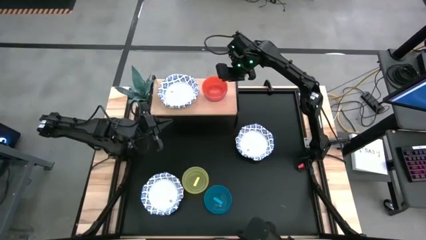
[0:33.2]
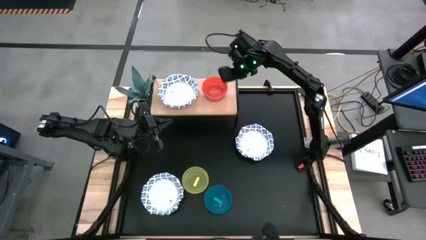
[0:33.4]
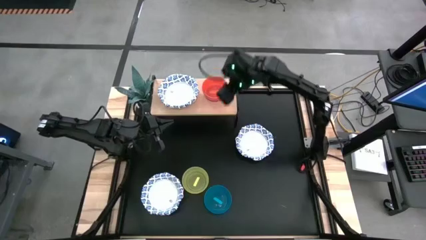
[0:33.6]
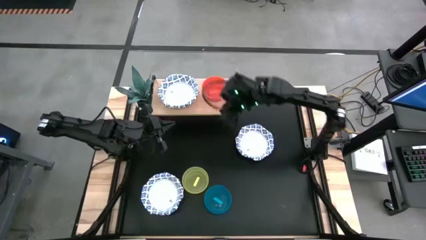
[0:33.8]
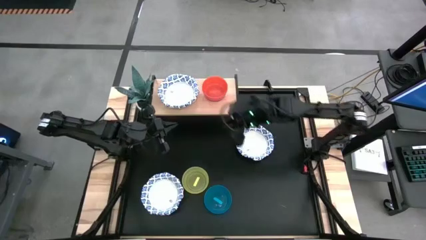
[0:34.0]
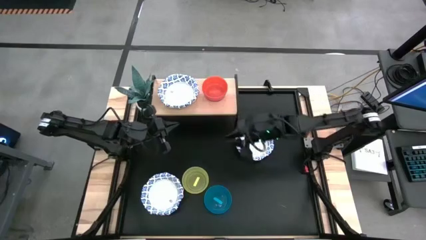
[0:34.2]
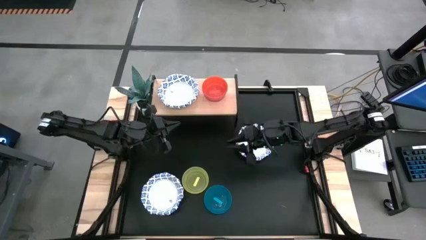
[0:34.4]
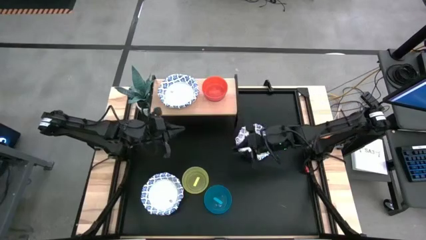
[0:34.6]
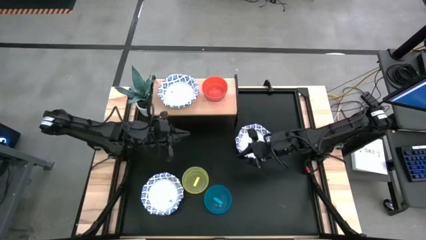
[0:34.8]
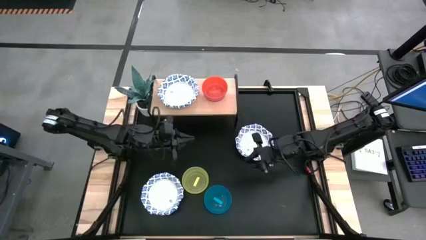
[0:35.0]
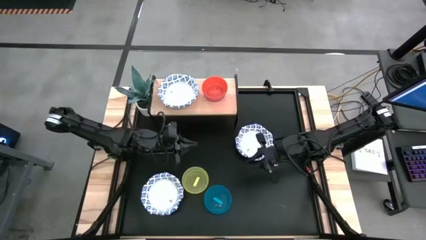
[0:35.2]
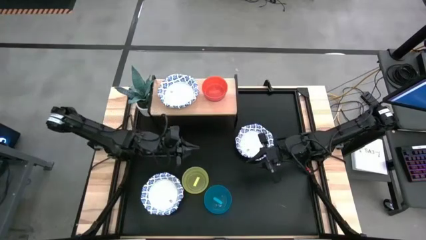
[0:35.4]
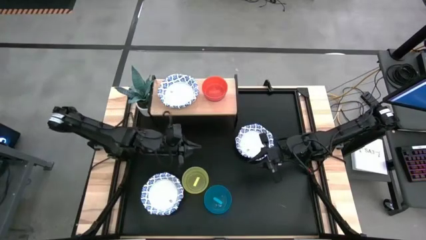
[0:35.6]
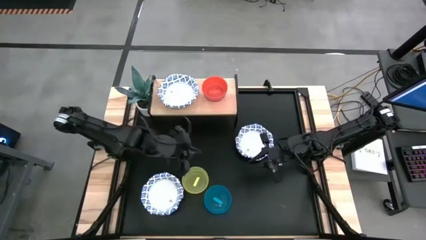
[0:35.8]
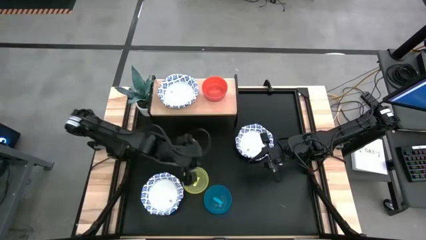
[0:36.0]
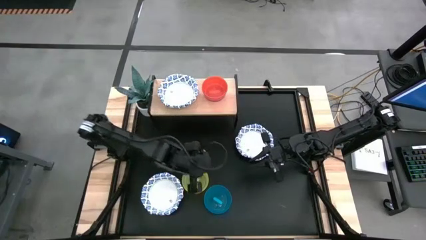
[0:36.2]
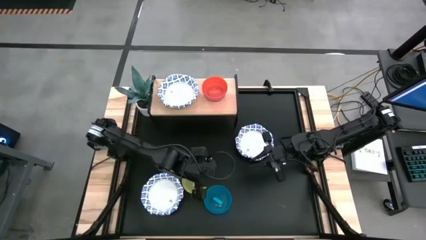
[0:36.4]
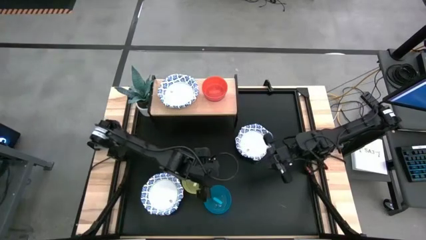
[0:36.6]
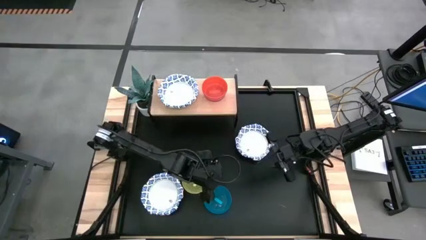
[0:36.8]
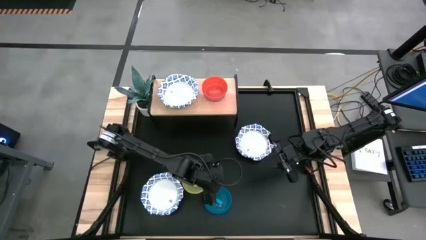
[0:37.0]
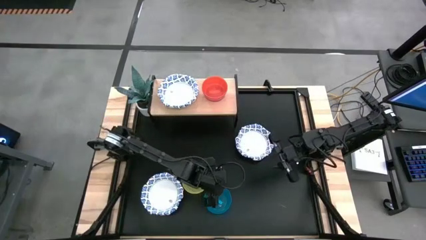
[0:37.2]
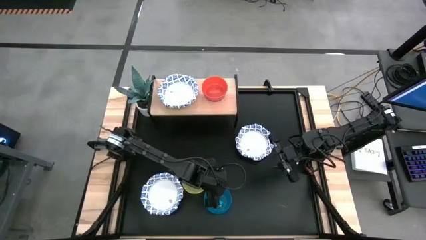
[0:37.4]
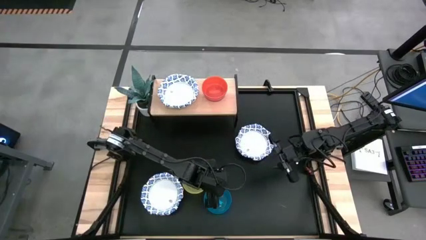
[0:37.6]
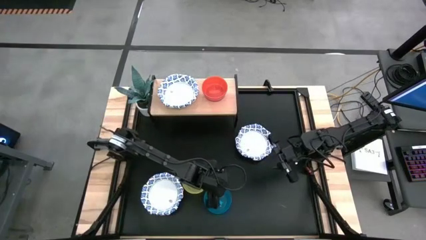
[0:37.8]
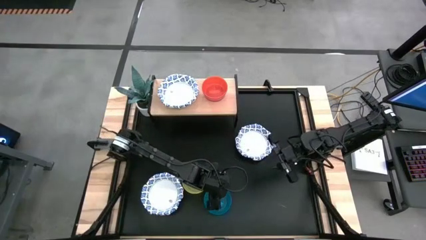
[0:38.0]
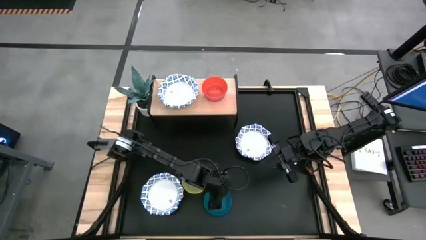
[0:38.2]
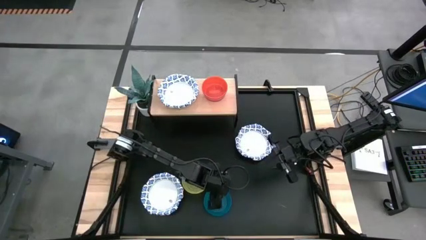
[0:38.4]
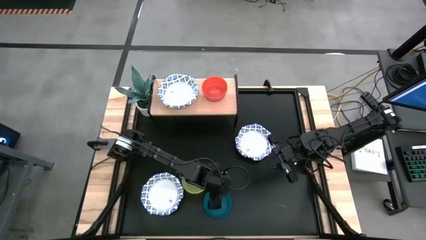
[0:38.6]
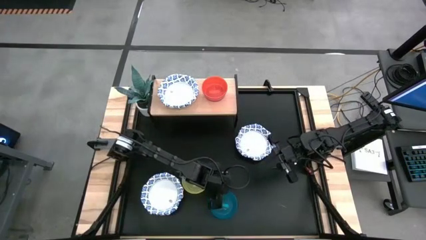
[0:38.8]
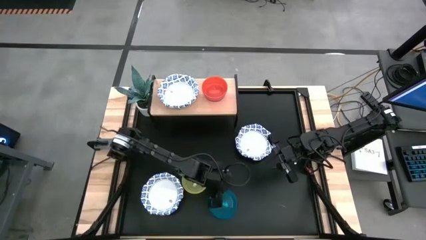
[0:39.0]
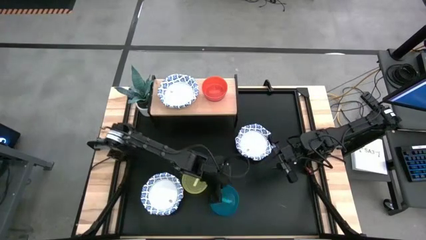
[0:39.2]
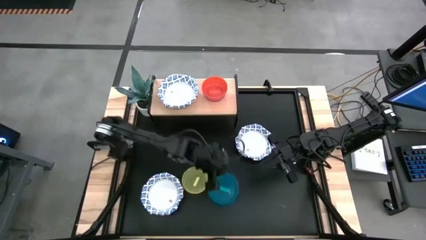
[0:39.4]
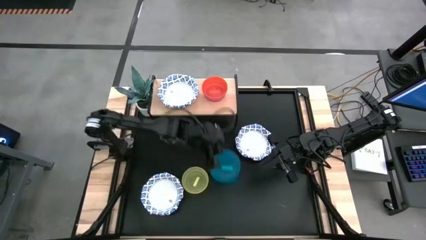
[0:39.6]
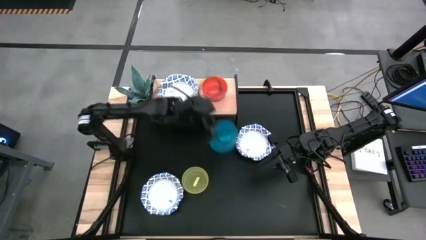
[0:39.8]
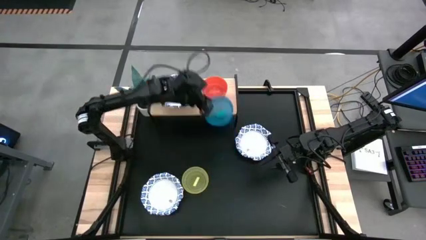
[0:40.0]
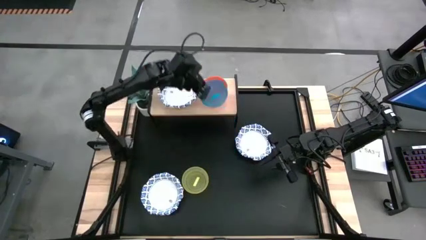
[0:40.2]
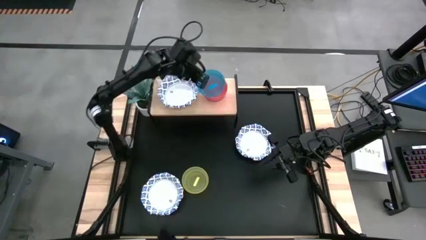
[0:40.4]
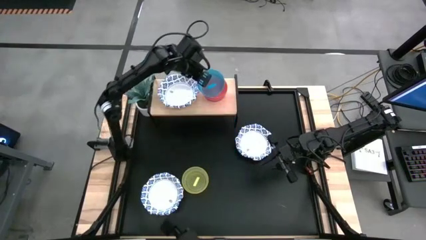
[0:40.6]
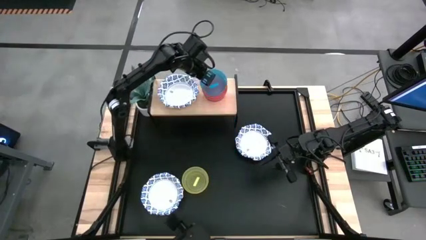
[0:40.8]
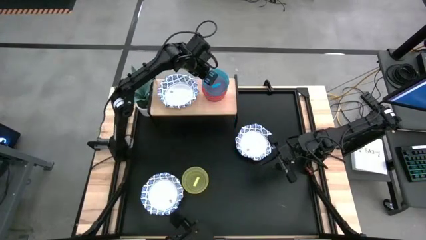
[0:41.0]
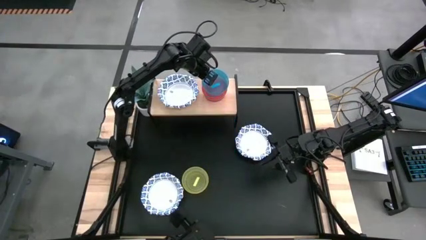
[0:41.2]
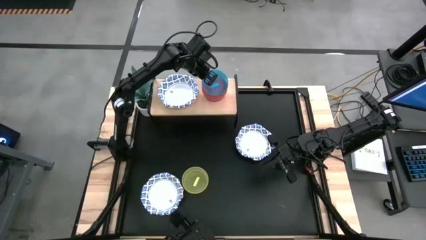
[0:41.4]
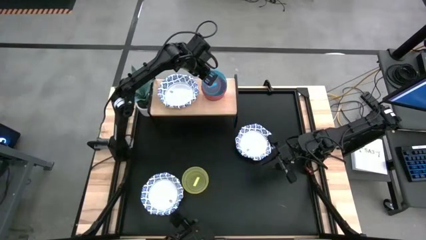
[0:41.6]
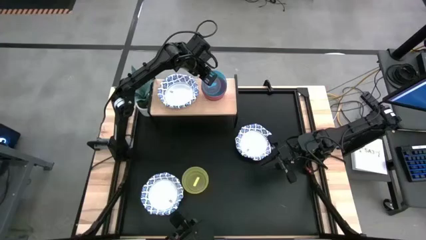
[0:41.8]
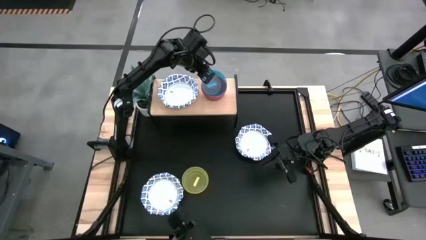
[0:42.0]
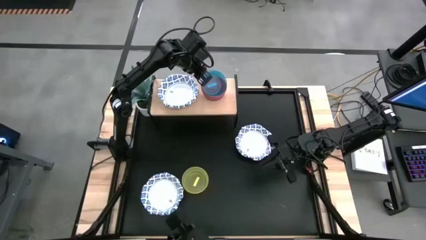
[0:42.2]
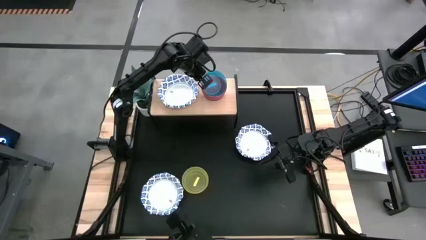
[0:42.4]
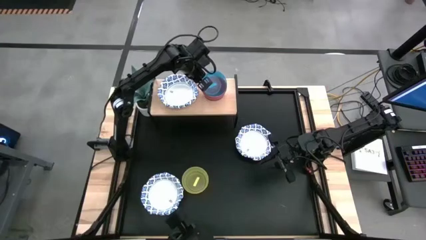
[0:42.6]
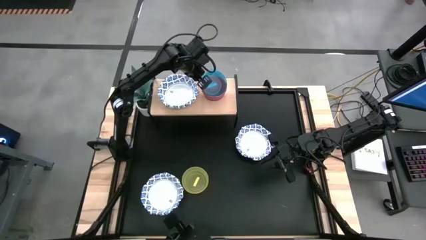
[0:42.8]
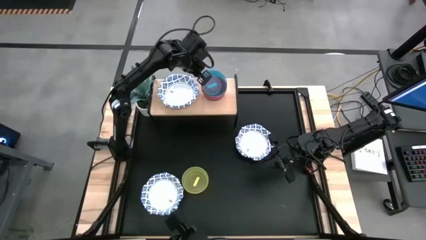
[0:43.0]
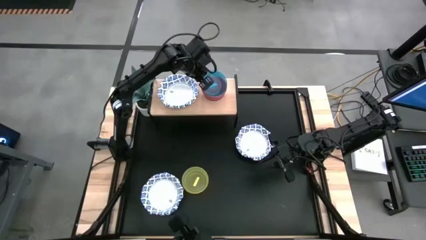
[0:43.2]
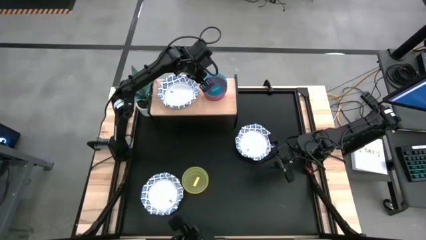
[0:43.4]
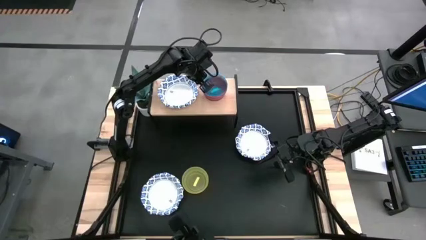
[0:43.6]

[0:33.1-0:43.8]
Task: Place and stack bowls onto a shelf
Stack the blue bowl on top of the orange bowl on the shelf

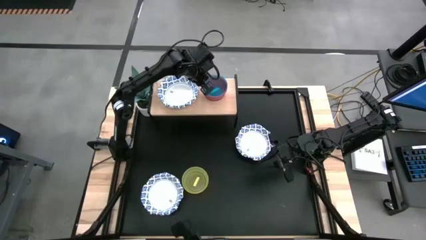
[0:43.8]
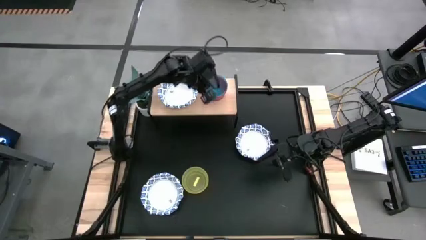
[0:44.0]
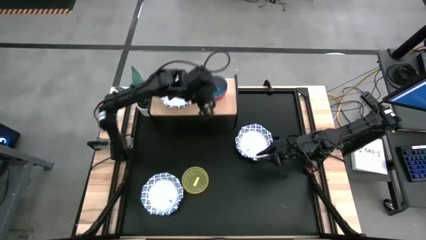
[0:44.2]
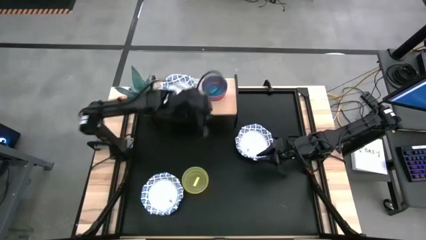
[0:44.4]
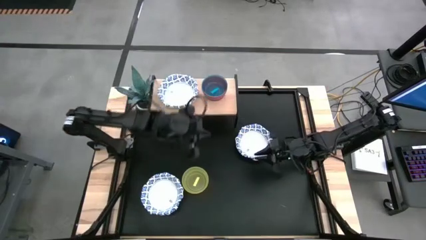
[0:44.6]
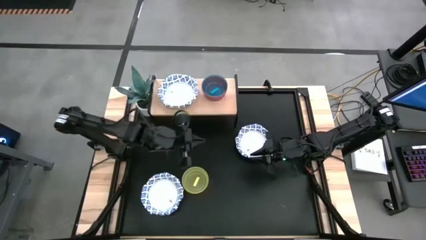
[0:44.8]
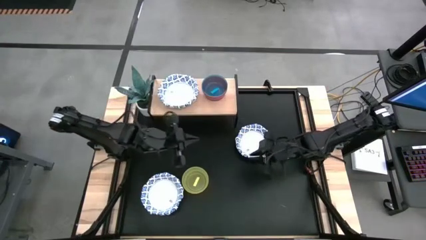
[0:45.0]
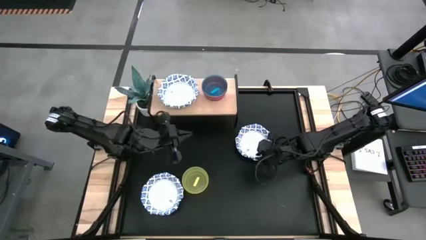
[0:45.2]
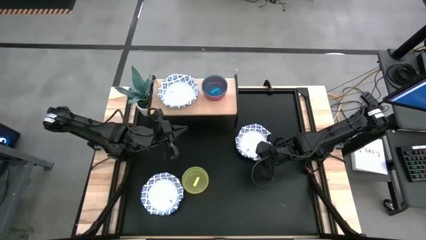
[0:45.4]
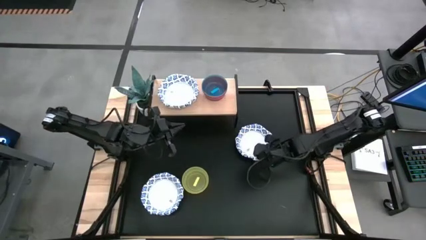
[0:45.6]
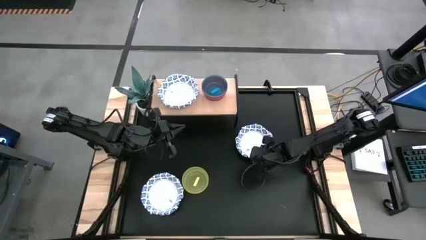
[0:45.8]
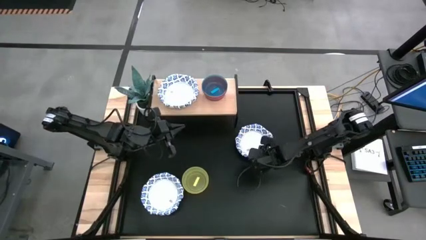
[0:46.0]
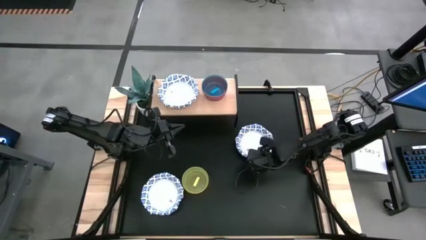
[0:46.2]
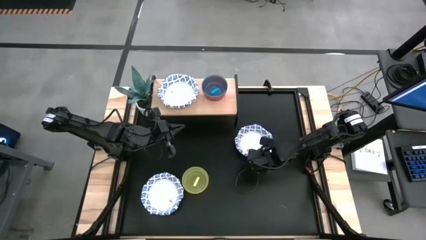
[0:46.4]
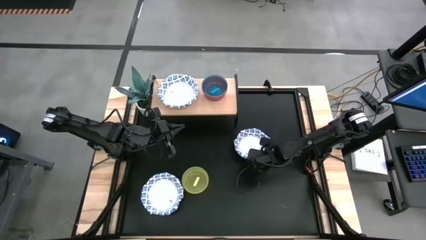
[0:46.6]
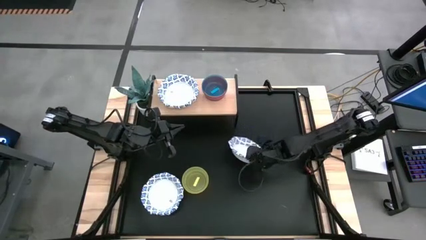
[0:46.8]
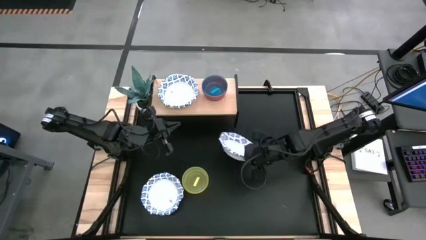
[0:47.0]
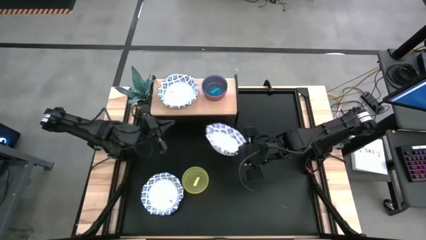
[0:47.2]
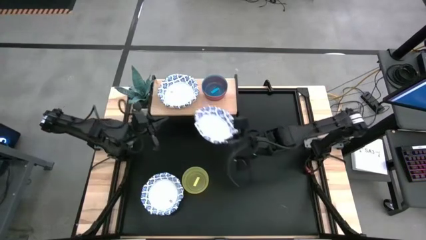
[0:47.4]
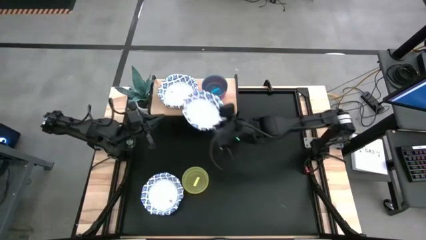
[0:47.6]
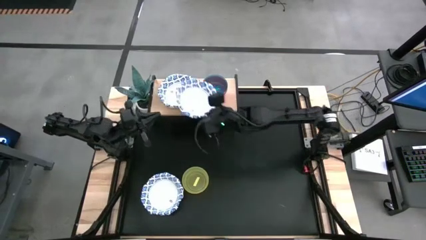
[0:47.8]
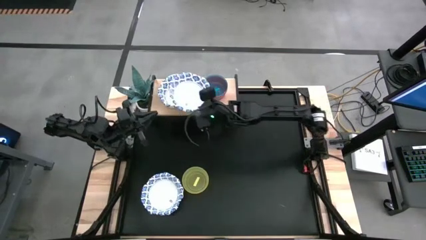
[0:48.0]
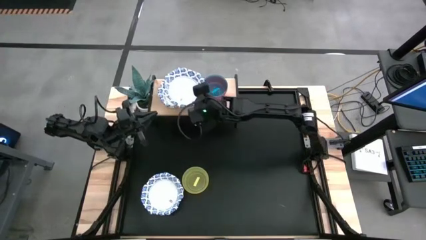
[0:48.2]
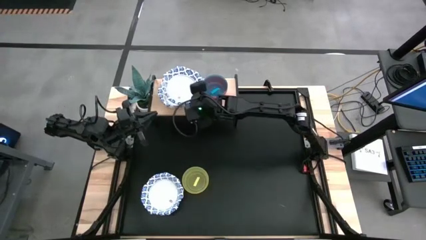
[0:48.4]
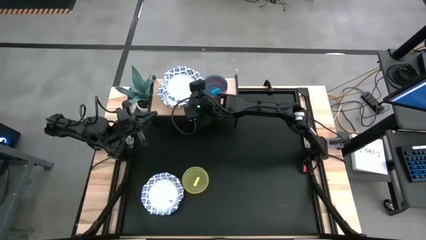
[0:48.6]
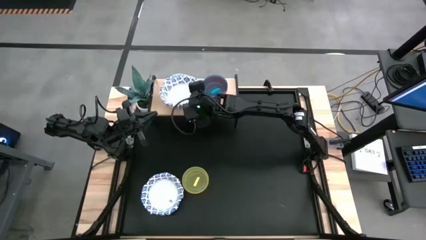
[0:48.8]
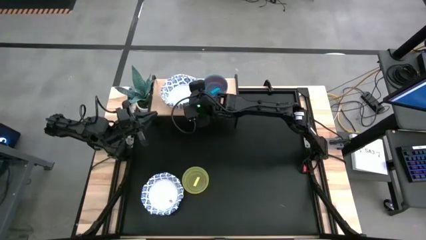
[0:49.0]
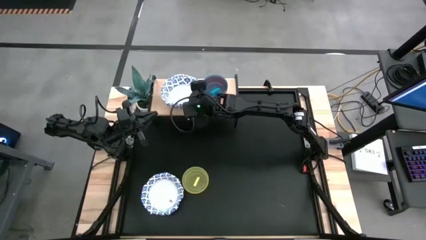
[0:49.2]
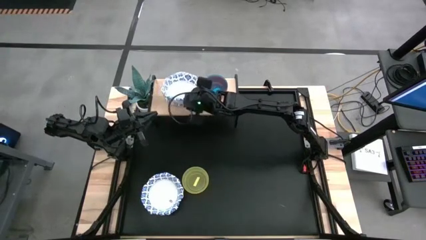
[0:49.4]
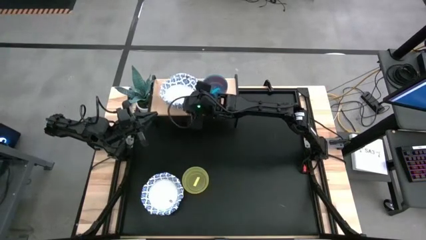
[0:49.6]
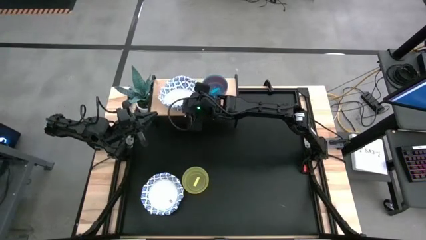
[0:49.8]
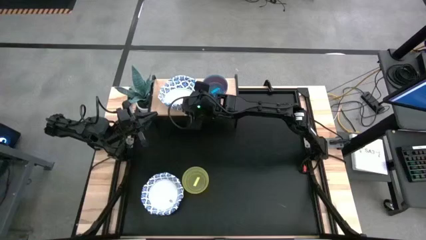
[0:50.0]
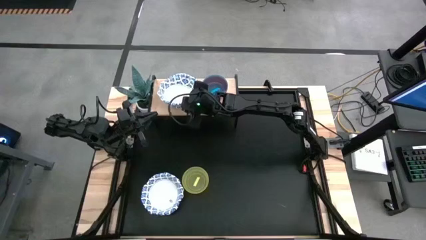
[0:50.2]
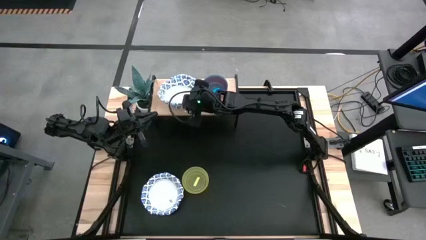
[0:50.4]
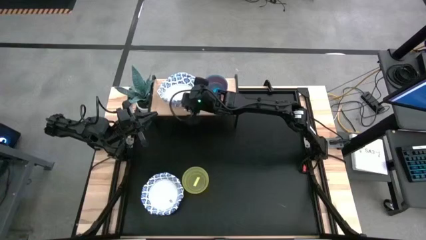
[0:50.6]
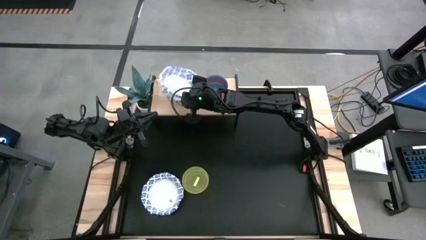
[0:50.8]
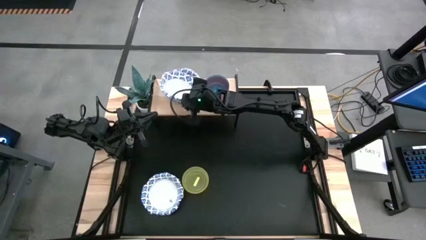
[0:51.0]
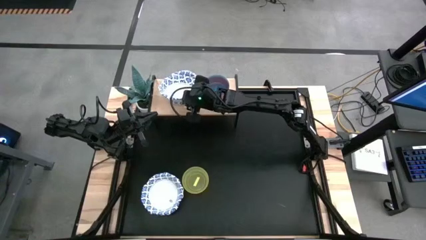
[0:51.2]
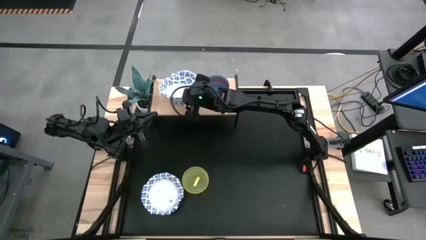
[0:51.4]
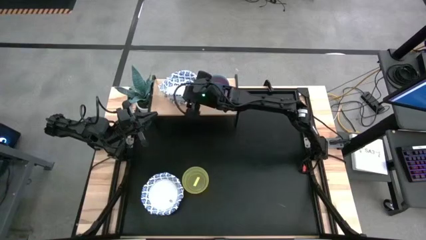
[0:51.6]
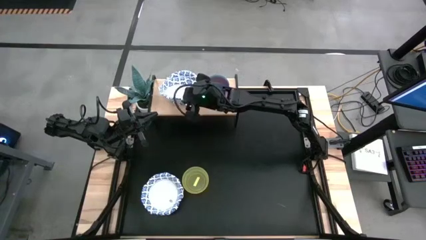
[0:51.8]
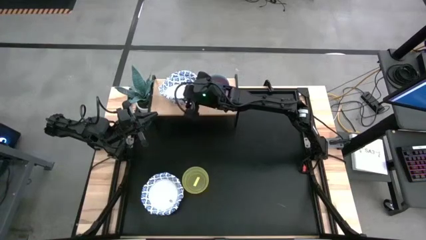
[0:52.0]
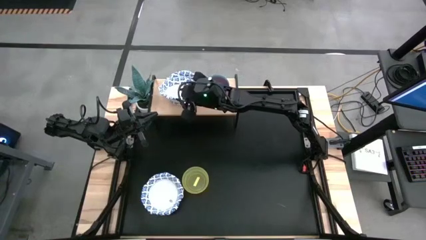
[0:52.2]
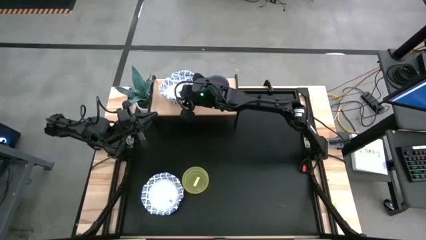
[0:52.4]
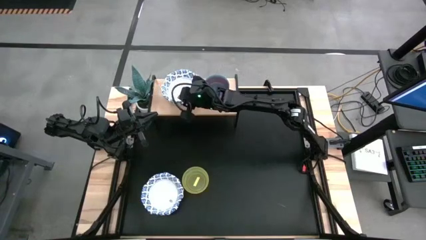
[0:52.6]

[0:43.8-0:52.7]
Stack the white patterned bowl on top of the white patterned bowl on the shelf
